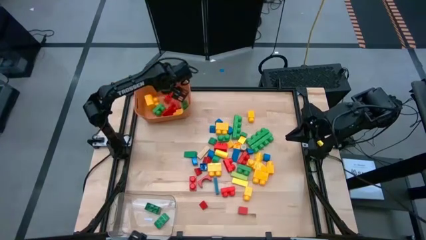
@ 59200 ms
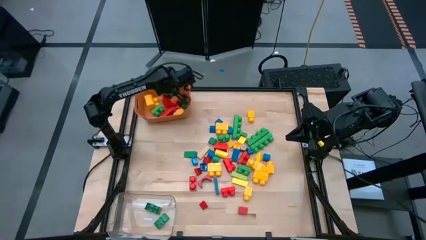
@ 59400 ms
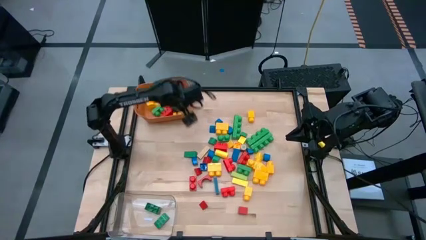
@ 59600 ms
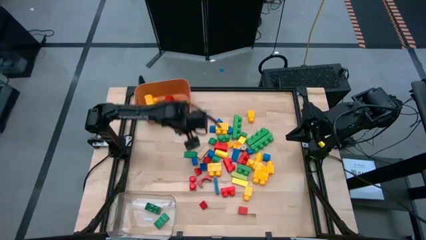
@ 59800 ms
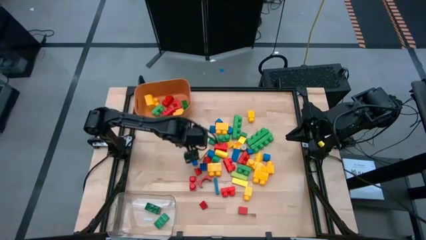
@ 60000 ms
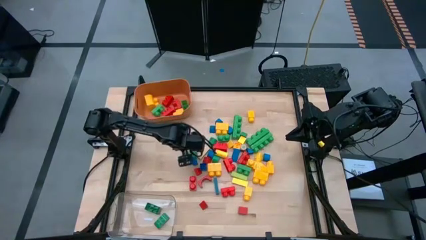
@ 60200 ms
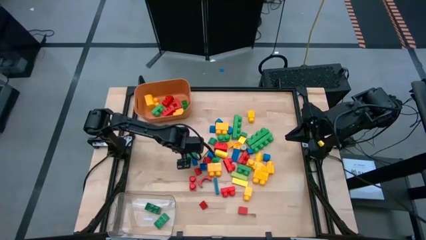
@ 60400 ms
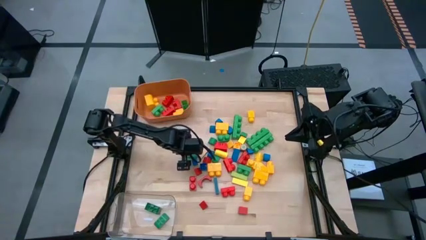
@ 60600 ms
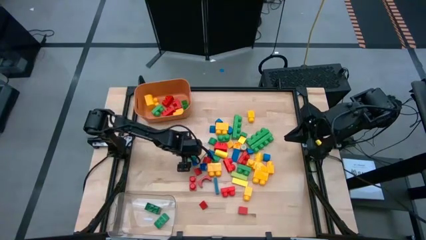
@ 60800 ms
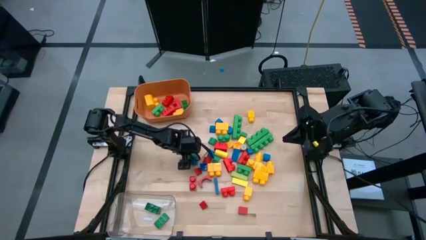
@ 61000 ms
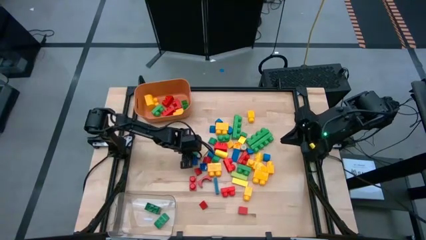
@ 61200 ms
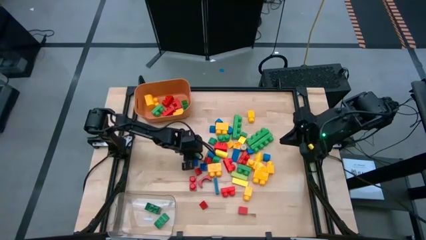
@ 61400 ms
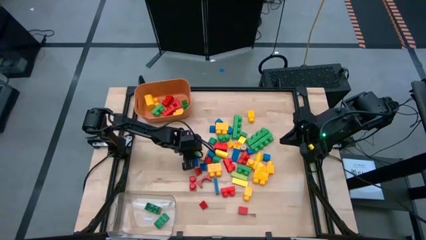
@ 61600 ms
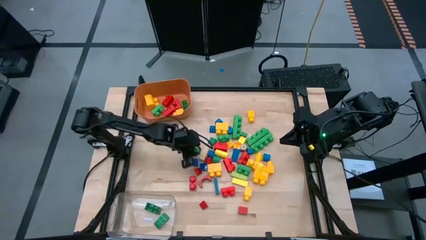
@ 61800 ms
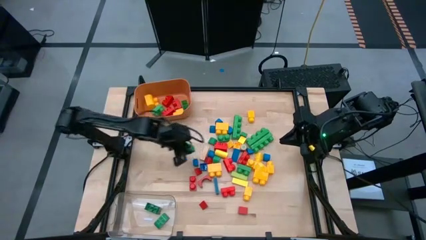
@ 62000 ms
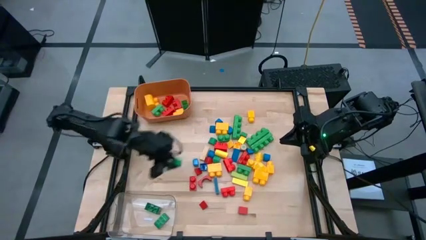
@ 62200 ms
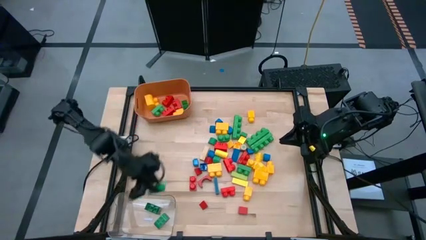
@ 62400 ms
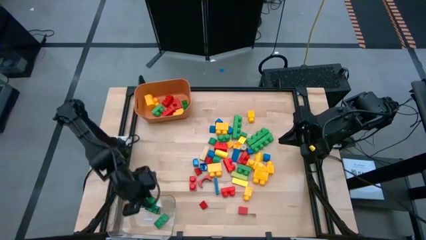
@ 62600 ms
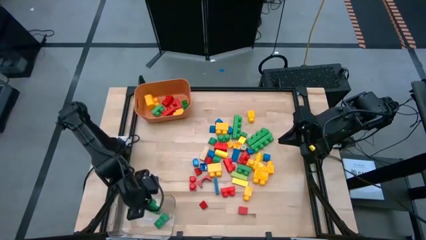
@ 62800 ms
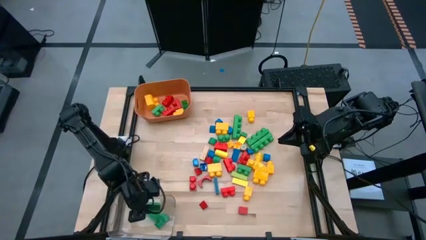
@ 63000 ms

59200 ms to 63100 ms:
Task: Sort blocks by size
Put the small green block into the transparent bin

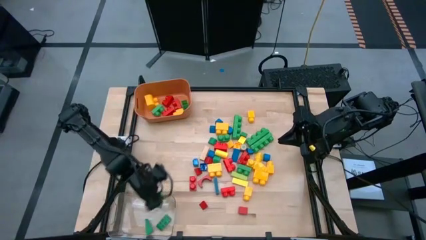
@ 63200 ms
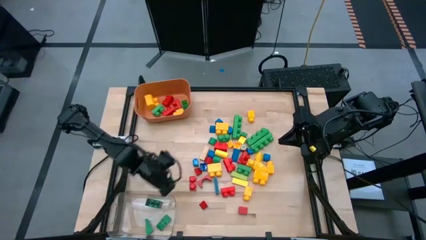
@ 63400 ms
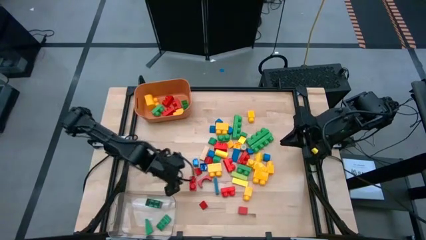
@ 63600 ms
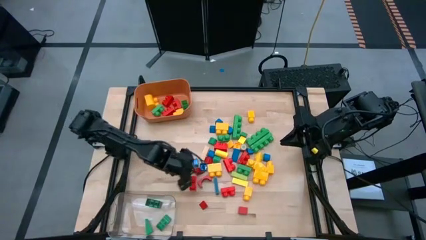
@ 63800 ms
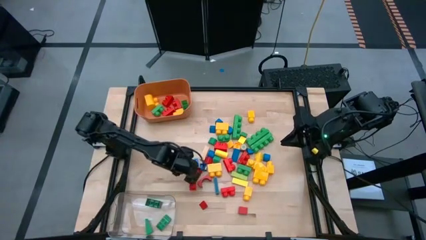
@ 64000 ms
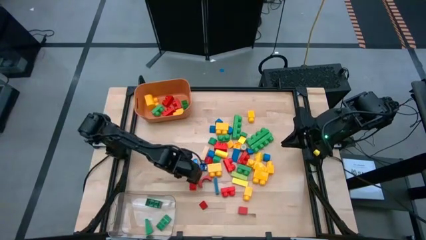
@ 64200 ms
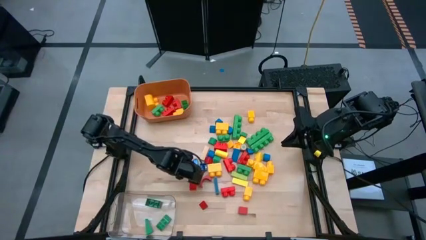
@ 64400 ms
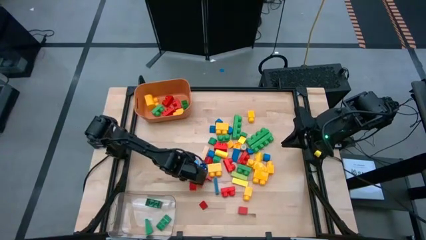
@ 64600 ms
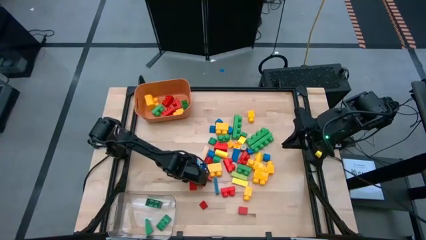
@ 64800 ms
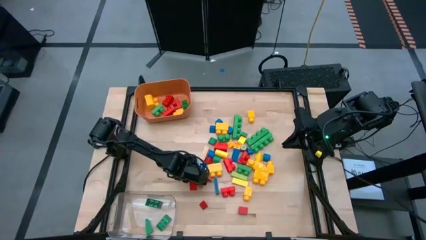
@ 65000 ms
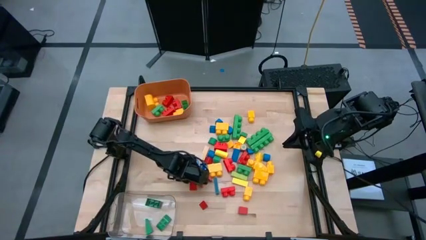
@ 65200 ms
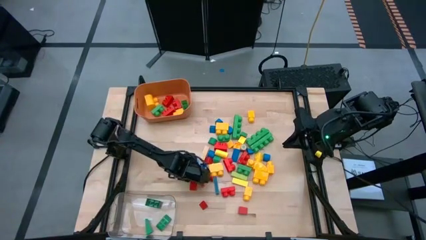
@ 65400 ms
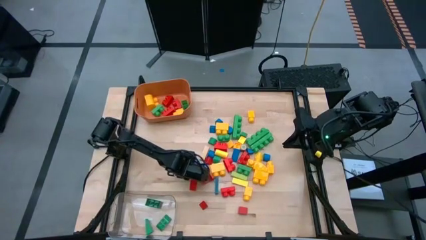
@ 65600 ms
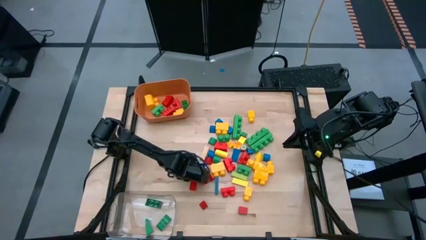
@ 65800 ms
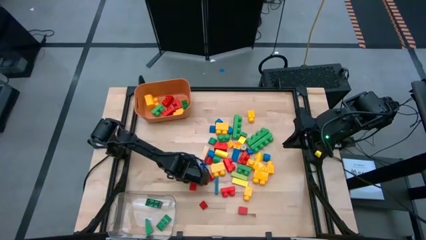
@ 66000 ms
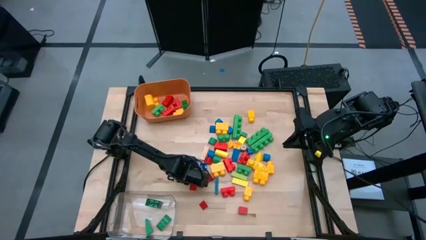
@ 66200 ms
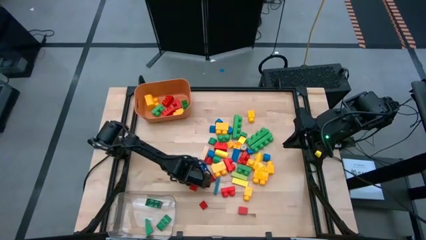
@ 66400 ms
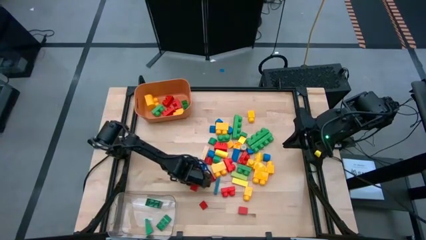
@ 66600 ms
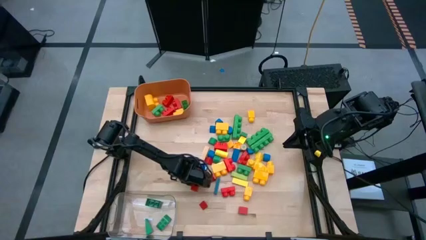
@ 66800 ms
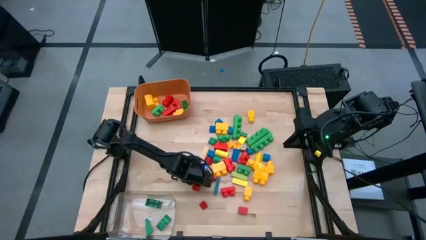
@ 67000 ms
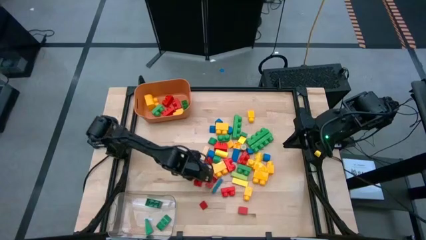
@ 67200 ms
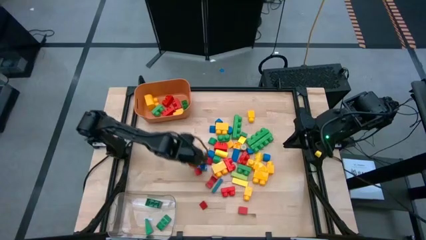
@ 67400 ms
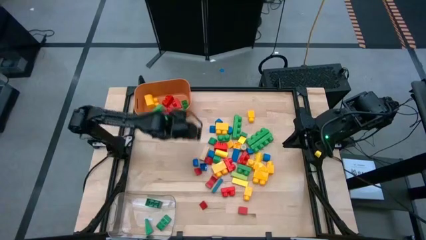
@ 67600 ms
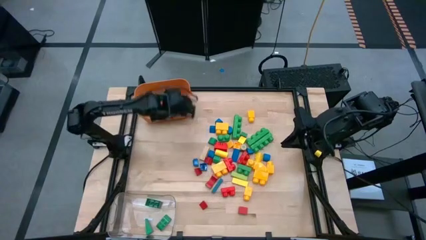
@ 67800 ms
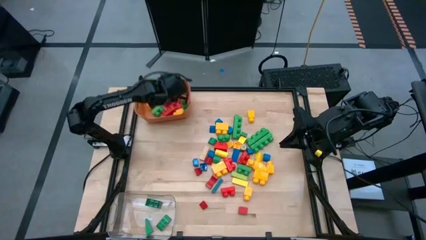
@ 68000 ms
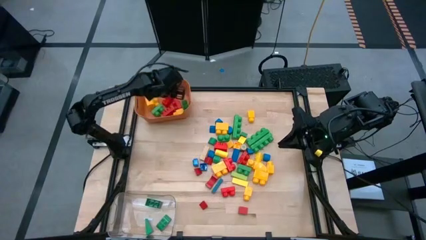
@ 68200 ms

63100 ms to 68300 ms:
Put the big red game piece into the orange bin

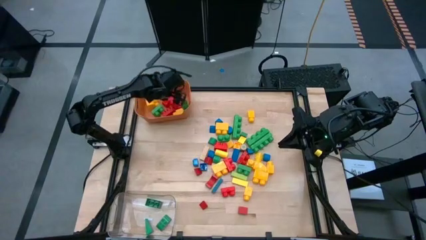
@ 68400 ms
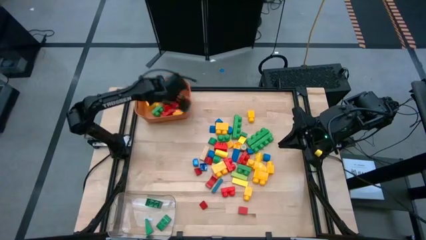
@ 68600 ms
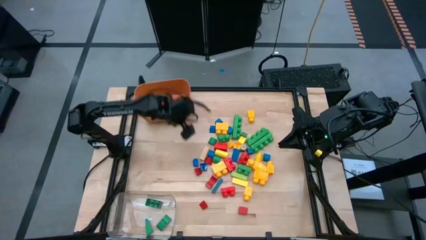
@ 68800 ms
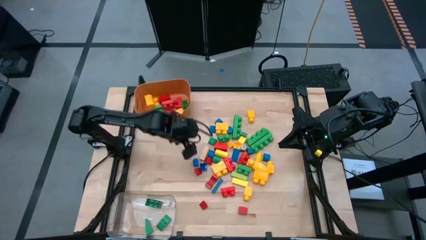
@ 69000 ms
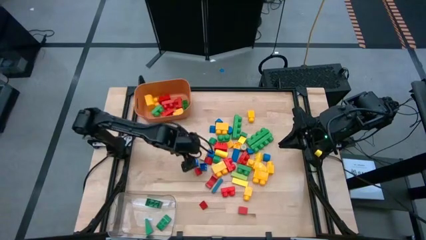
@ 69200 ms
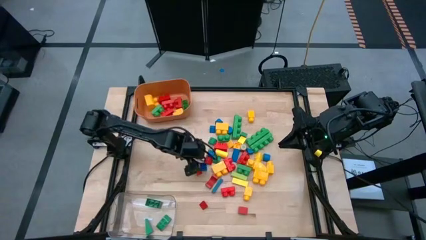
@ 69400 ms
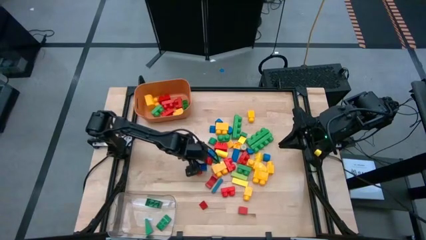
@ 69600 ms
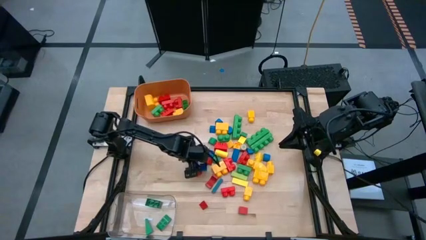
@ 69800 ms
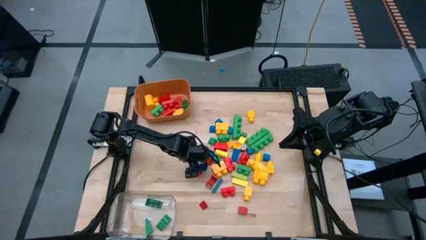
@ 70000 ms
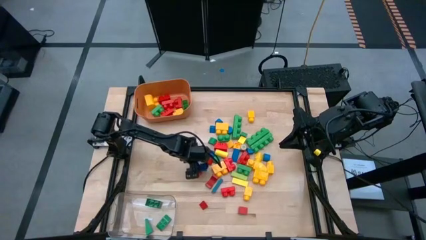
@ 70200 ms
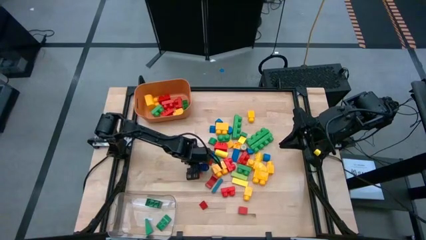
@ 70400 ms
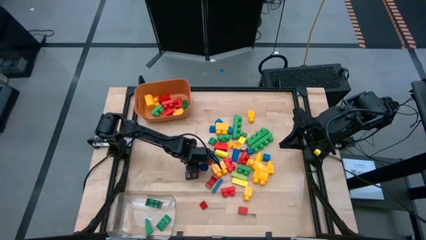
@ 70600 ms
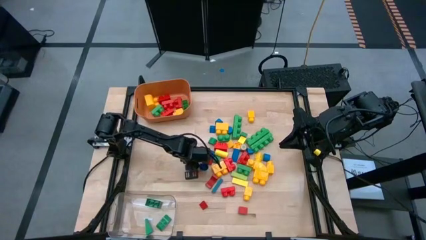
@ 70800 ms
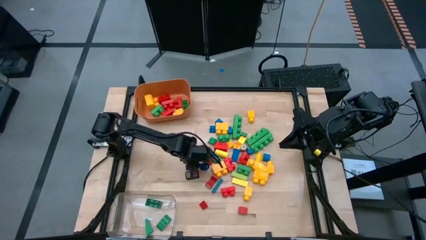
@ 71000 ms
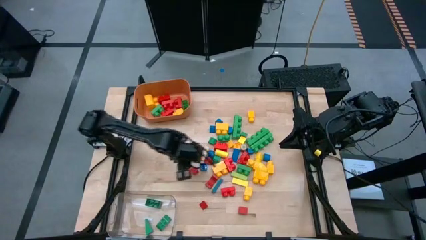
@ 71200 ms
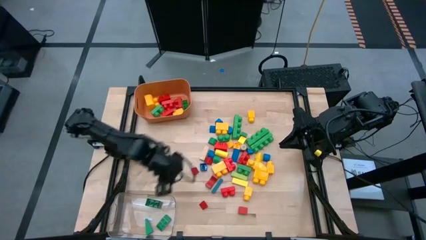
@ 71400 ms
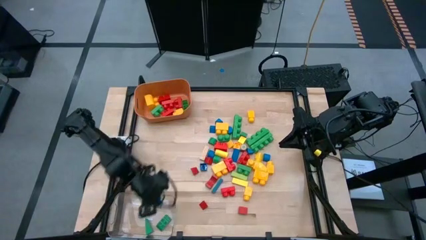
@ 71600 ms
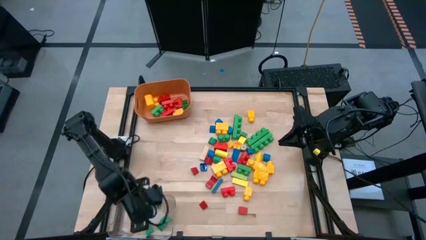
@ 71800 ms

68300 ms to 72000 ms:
Put the small blue game piece into the transparent bin

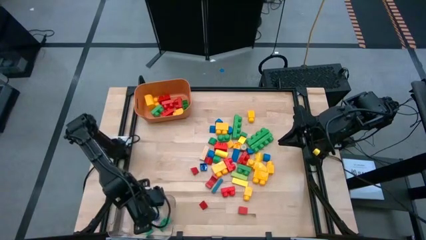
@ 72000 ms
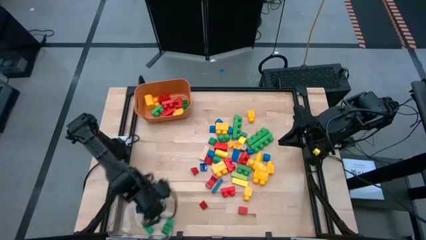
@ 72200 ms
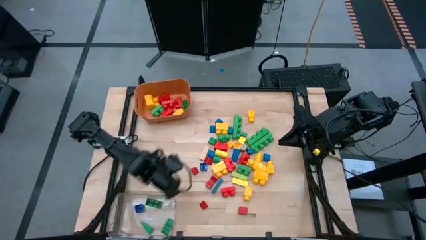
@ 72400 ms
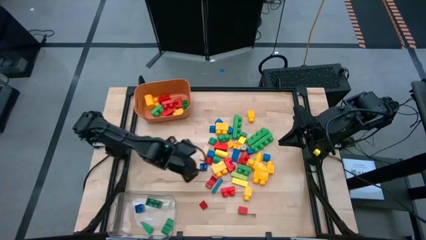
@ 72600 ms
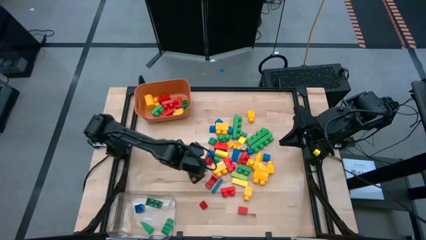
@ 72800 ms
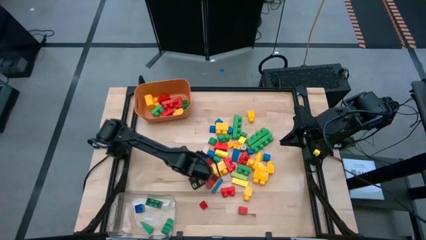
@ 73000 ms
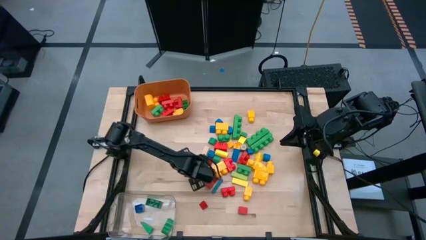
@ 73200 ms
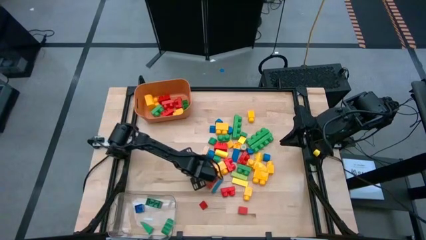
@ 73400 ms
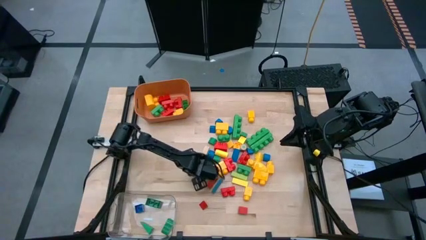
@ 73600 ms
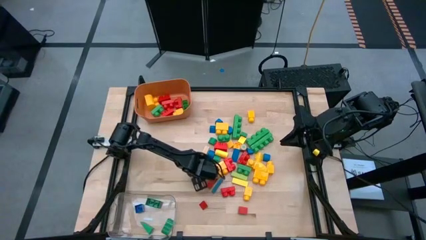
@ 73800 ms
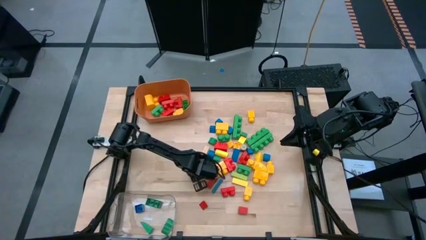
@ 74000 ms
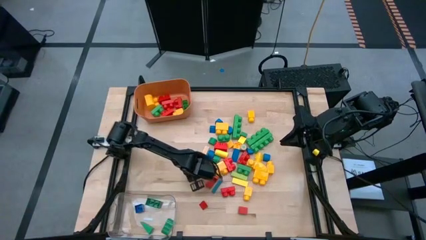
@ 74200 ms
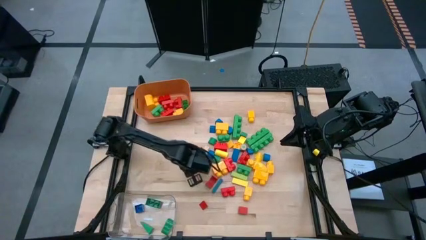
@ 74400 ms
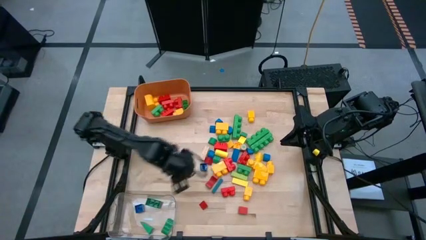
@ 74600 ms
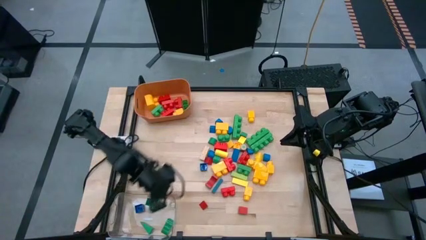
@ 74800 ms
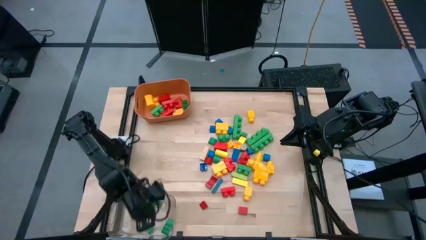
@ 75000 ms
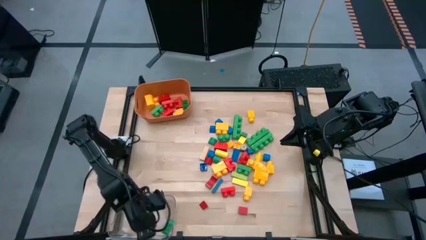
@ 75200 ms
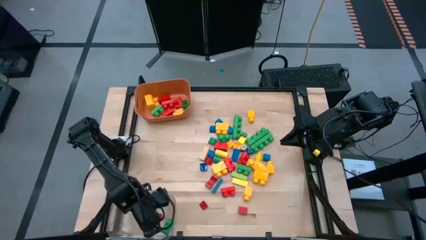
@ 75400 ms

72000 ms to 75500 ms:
Put the small red block into the transparent bin

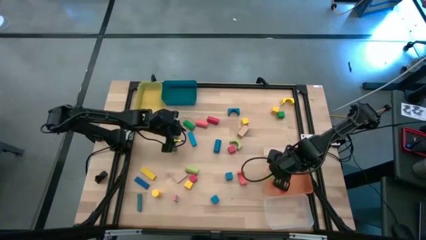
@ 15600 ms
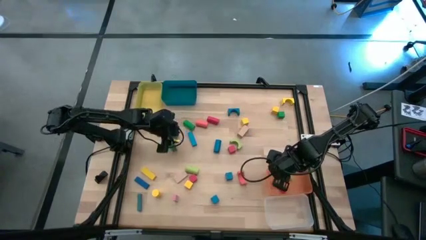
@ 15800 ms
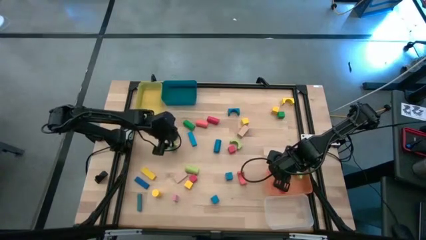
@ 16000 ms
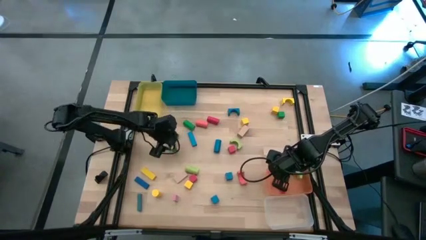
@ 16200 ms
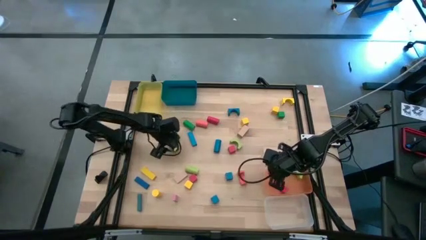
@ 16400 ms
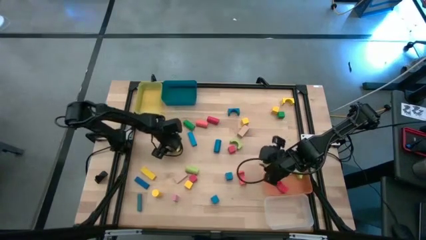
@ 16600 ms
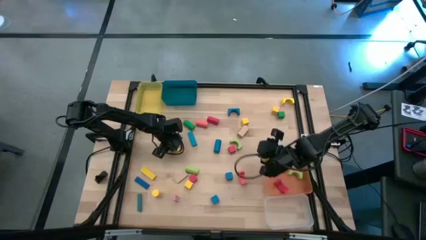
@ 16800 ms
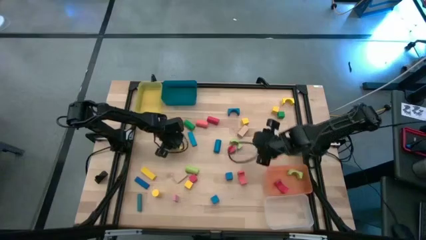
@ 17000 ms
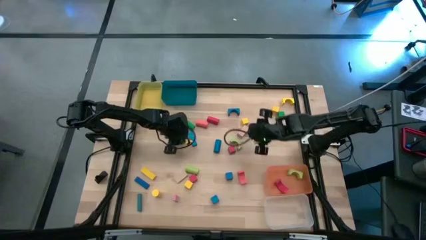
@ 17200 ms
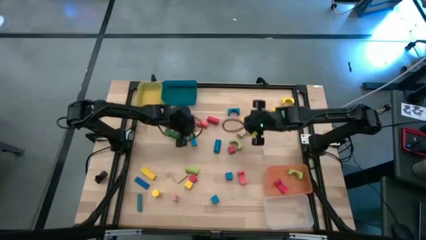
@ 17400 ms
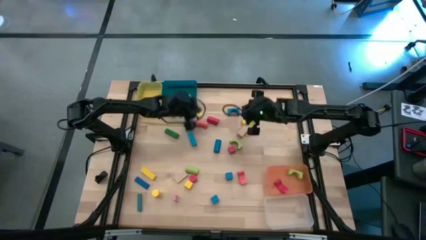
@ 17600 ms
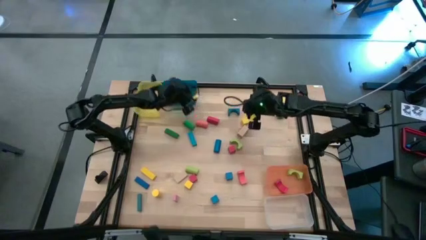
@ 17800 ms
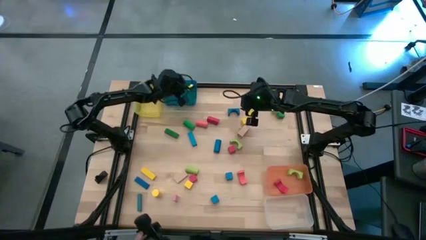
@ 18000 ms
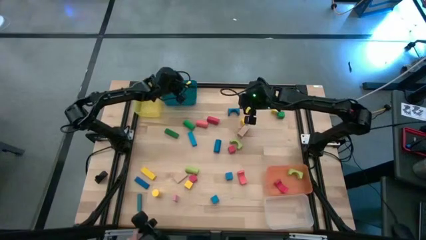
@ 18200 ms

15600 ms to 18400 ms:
Task: Sort blocks by size
Put the green rectangular block into the blue bin
